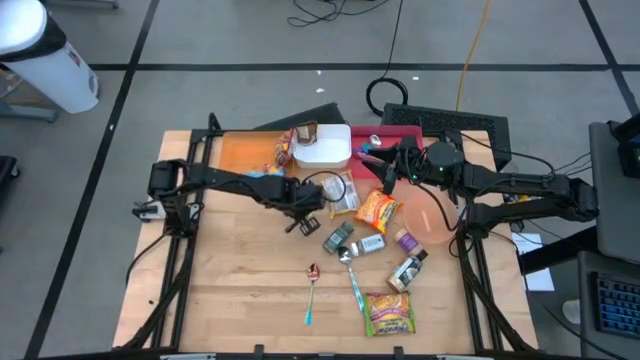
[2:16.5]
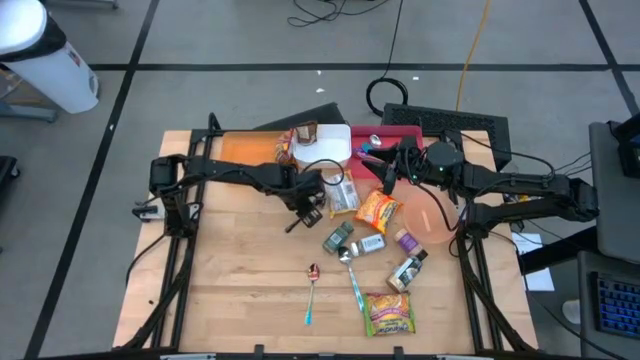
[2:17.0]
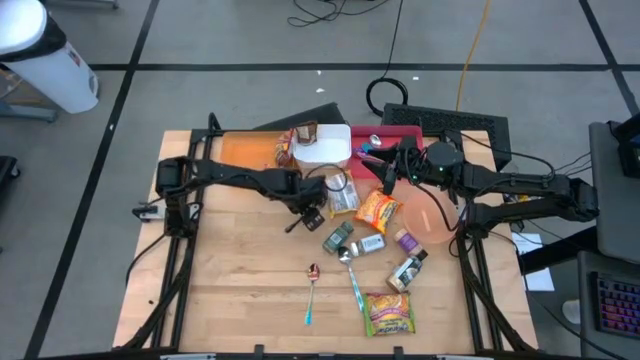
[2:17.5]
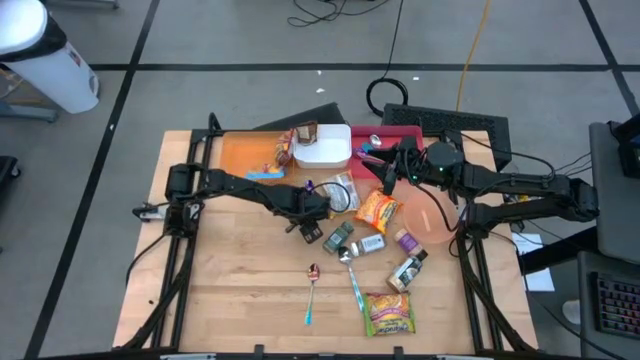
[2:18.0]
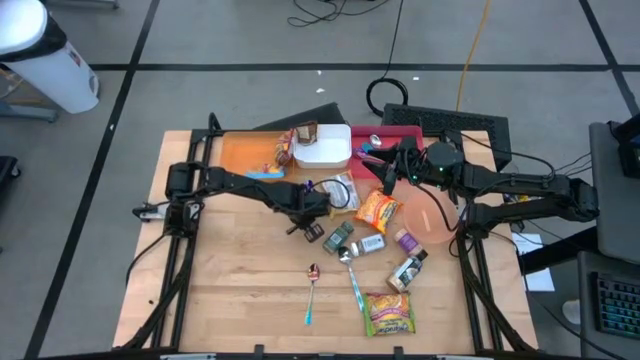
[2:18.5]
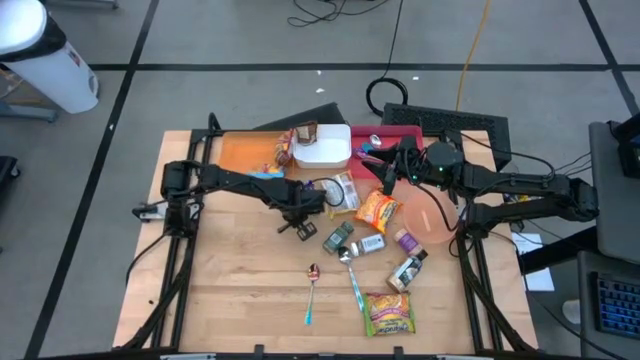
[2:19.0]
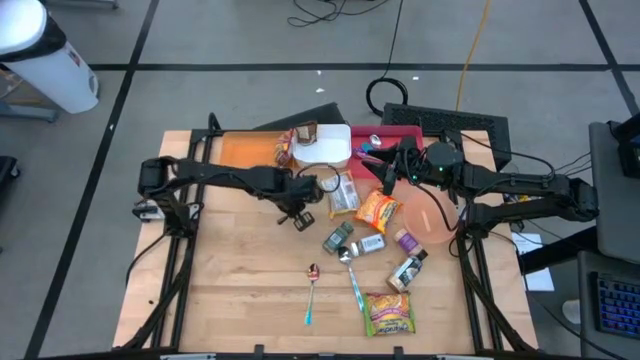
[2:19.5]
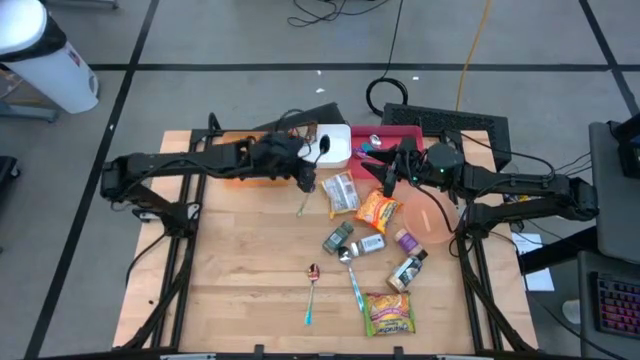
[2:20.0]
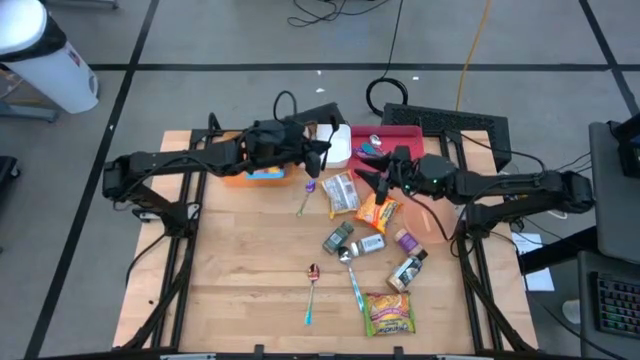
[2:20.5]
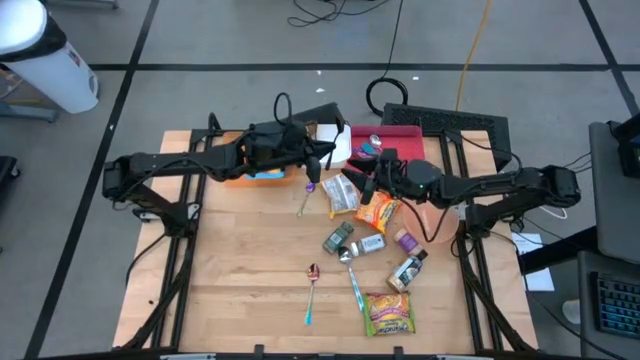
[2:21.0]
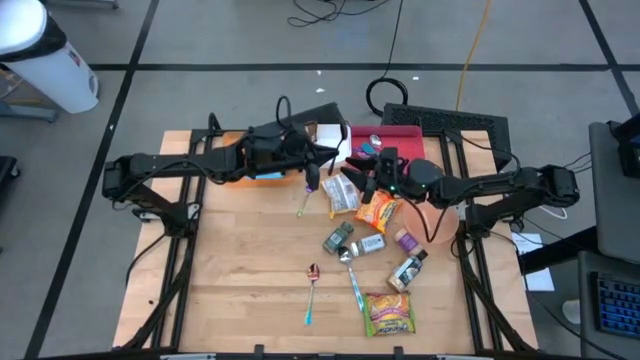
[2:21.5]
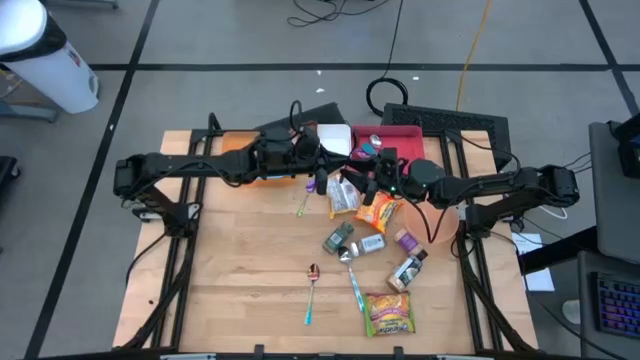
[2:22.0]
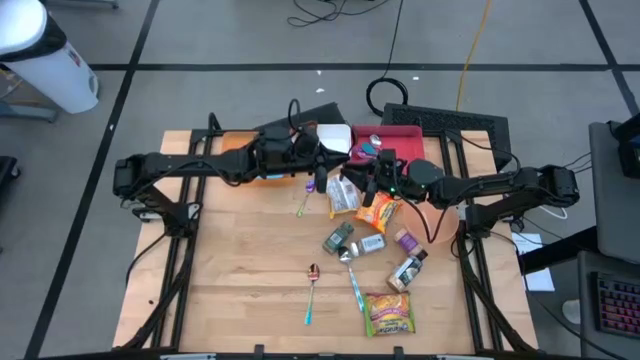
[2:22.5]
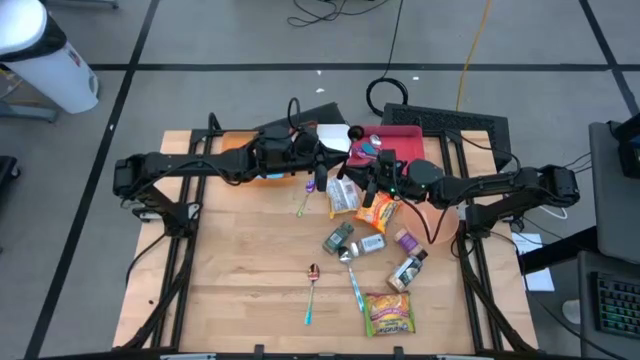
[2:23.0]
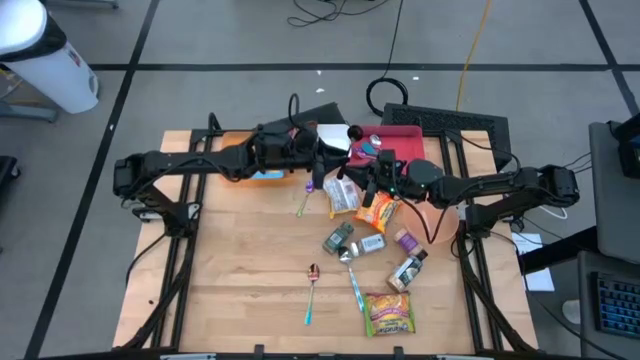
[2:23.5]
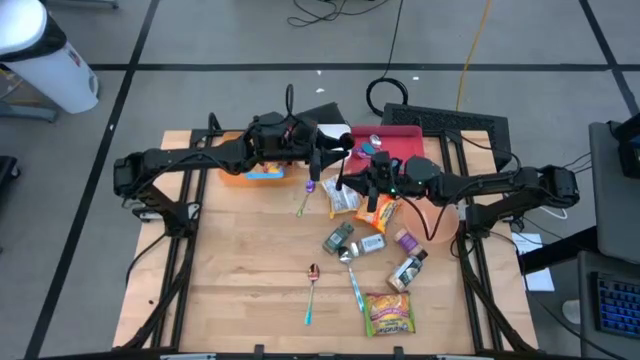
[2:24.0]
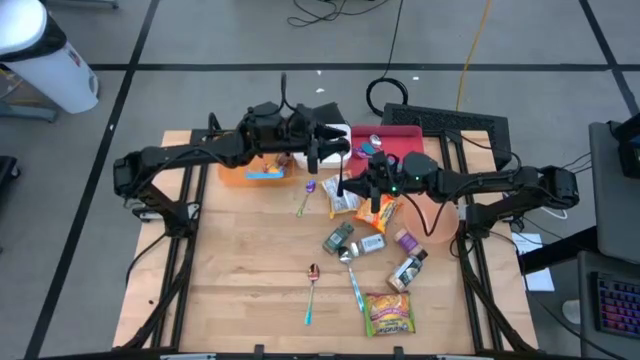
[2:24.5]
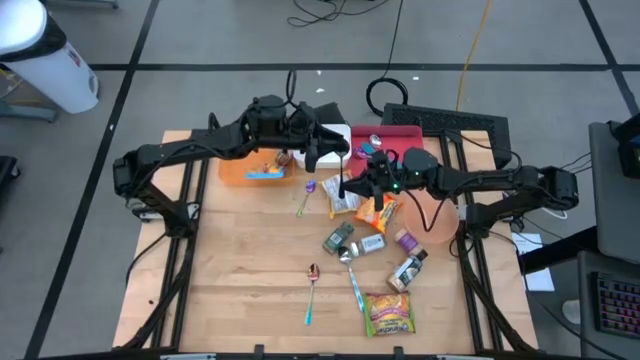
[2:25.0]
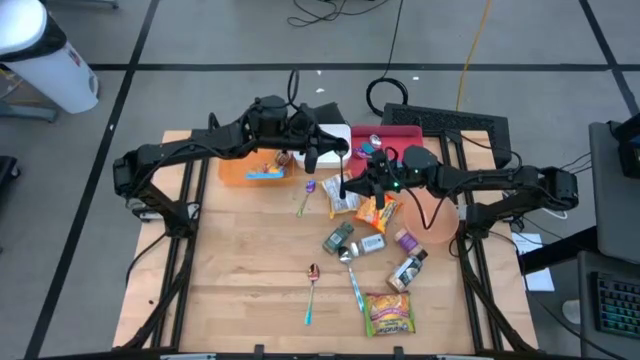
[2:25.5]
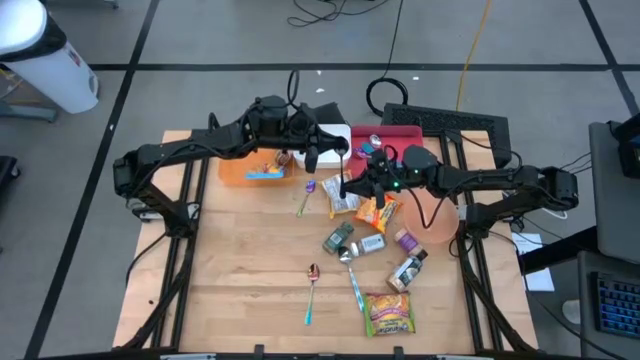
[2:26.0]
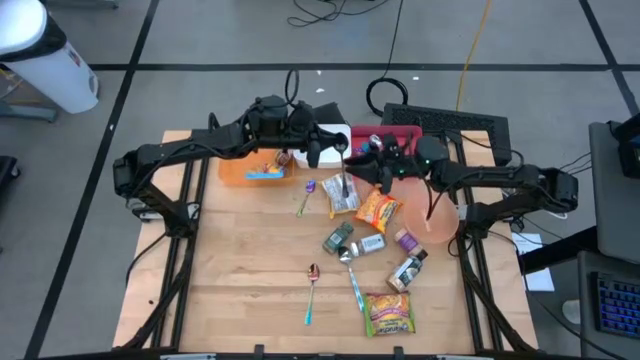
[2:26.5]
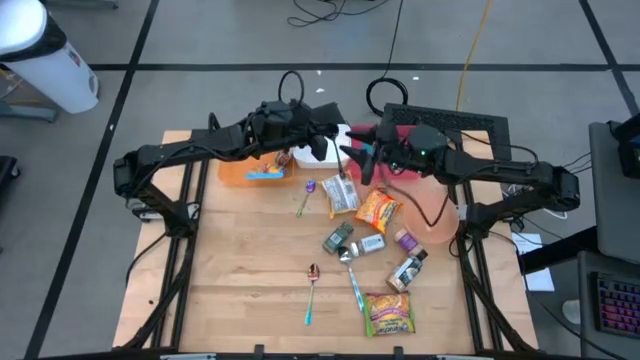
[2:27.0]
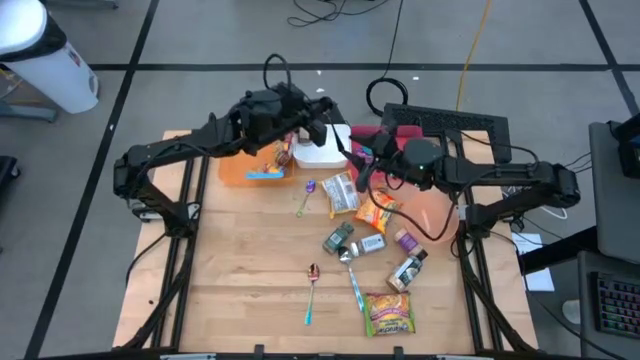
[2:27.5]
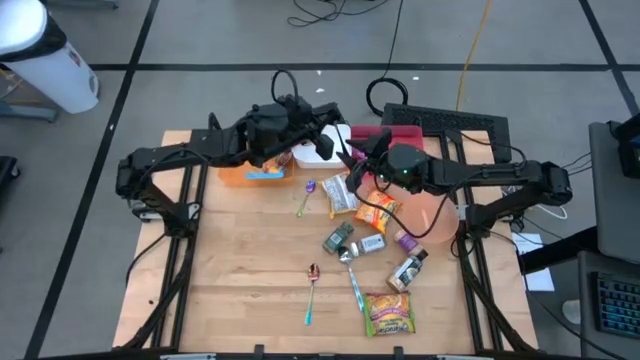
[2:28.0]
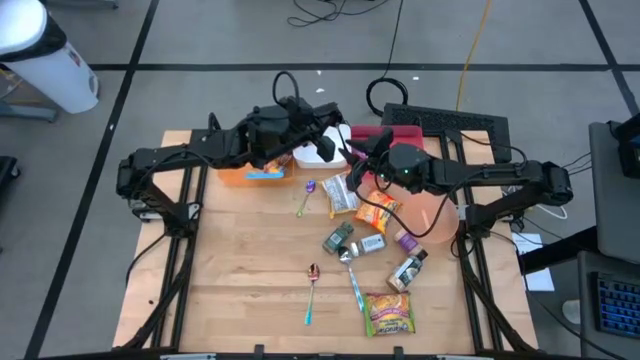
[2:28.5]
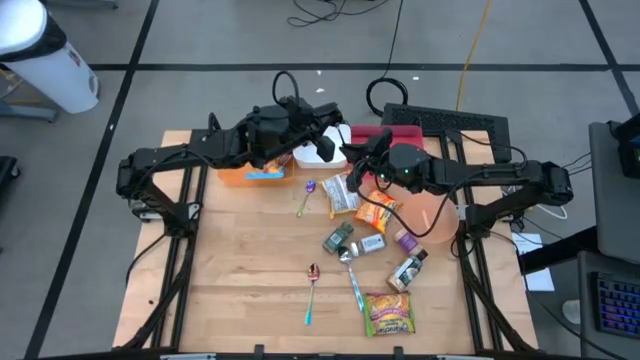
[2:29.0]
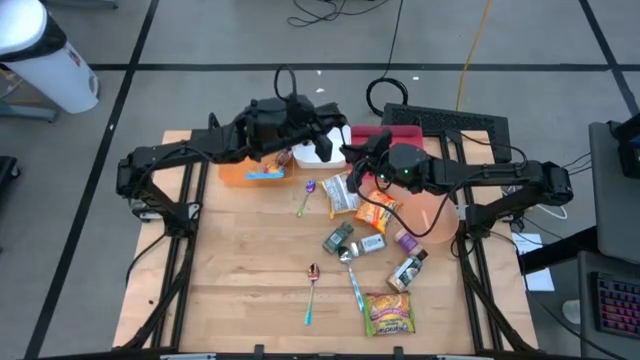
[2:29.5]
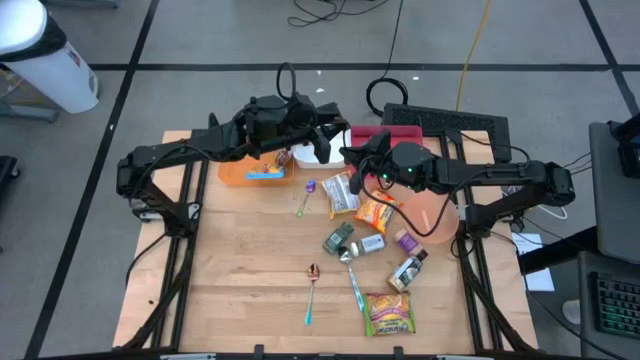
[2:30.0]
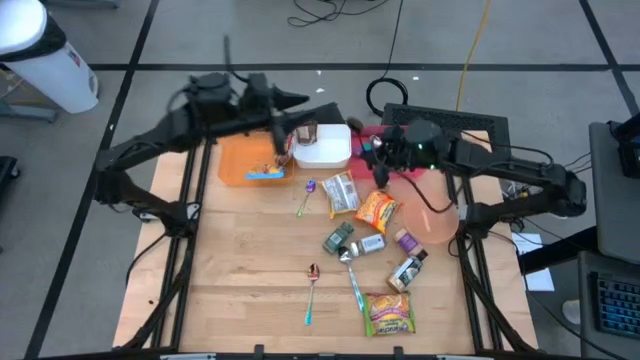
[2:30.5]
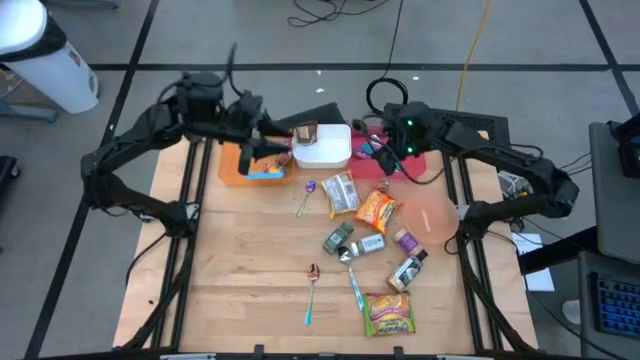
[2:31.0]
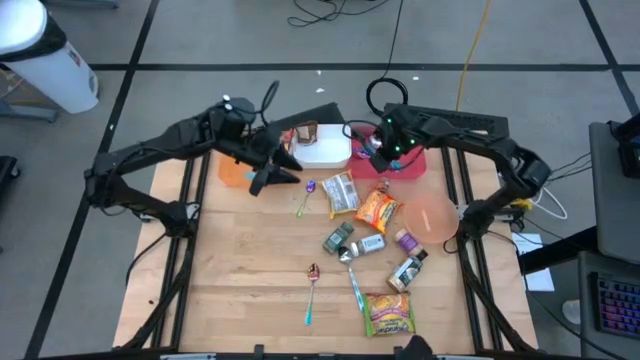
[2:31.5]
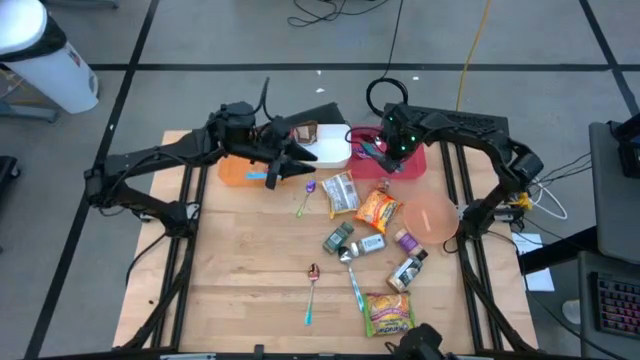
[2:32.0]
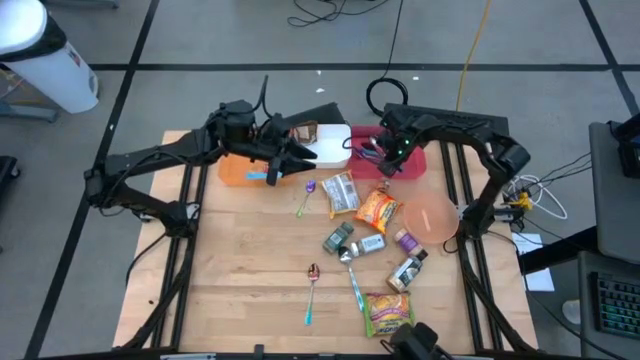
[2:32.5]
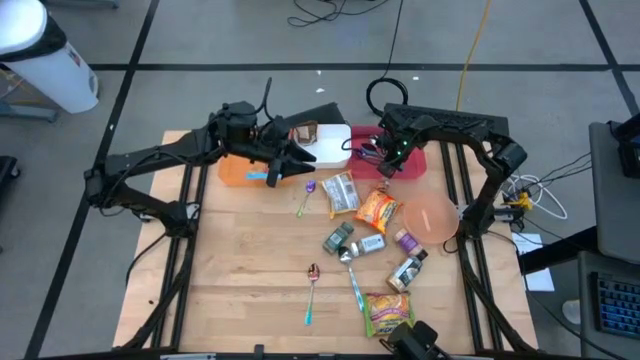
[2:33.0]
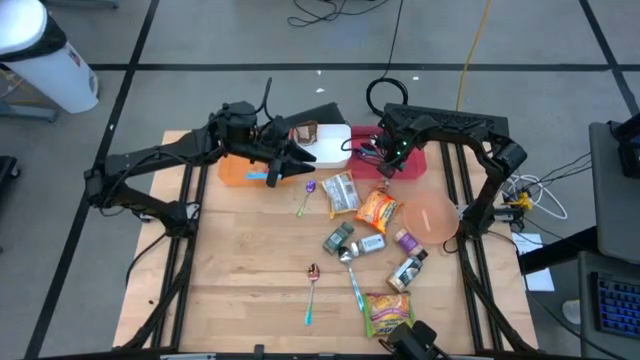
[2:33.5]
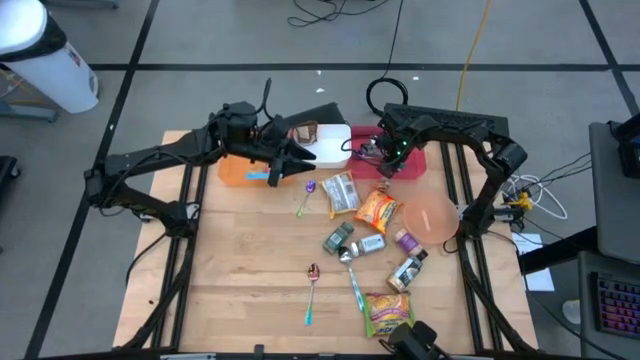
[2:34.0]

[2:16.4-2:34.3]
Task: Pick & Place Food Item
Put the black spoon into the red bin
